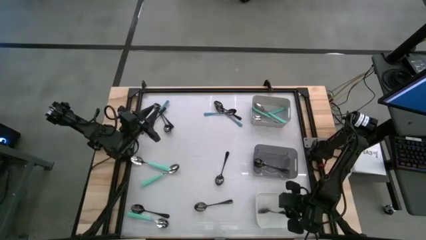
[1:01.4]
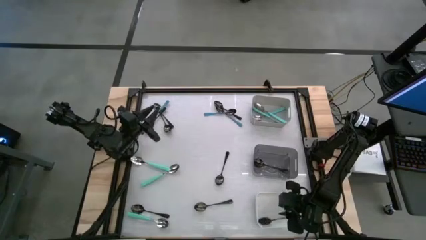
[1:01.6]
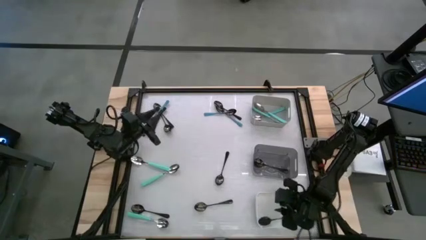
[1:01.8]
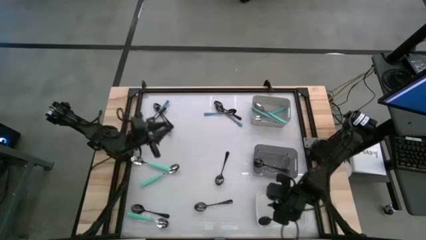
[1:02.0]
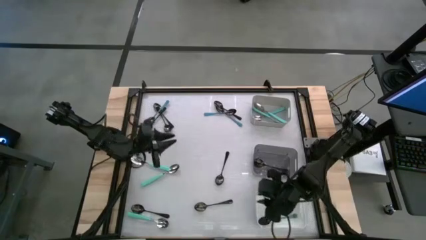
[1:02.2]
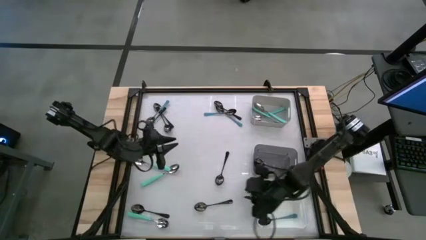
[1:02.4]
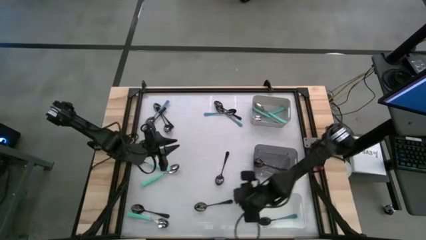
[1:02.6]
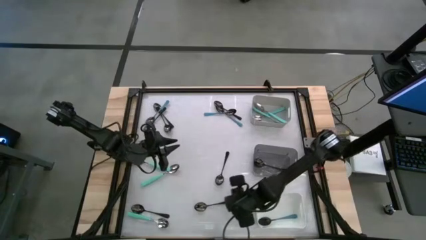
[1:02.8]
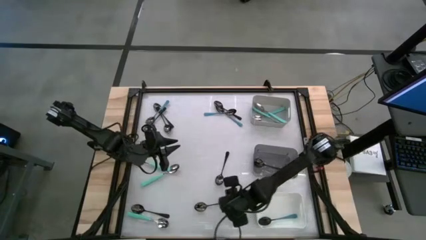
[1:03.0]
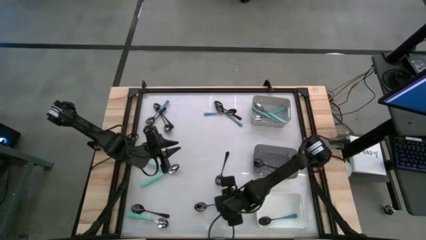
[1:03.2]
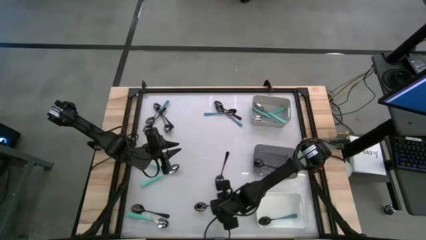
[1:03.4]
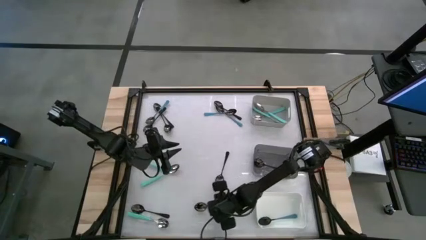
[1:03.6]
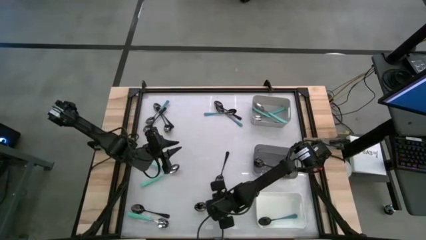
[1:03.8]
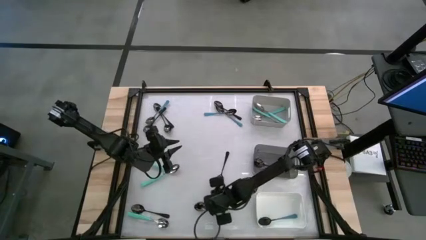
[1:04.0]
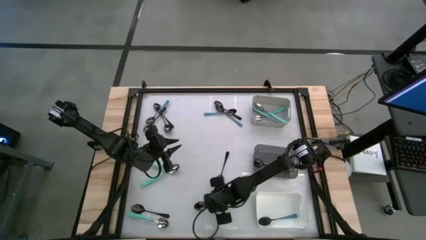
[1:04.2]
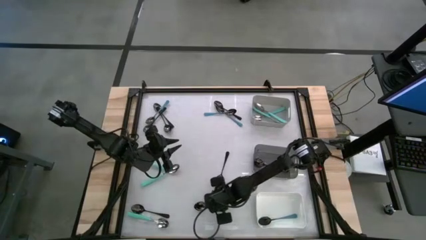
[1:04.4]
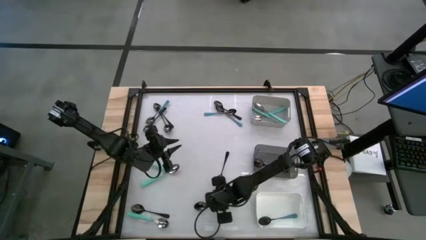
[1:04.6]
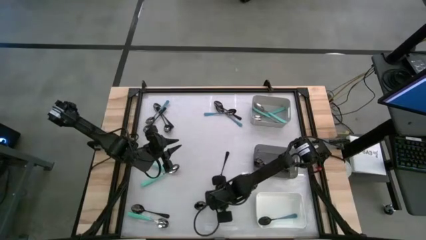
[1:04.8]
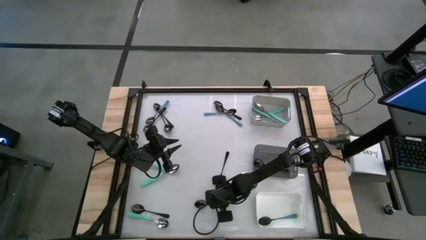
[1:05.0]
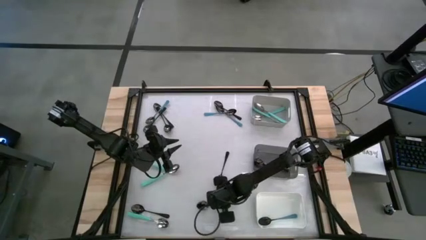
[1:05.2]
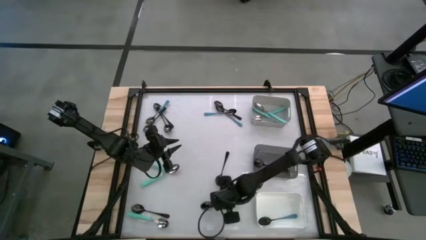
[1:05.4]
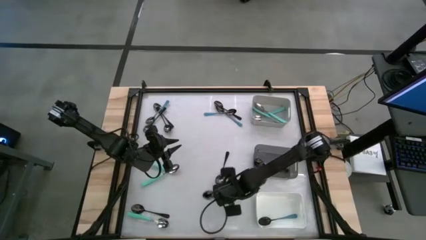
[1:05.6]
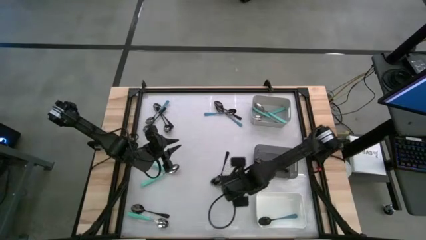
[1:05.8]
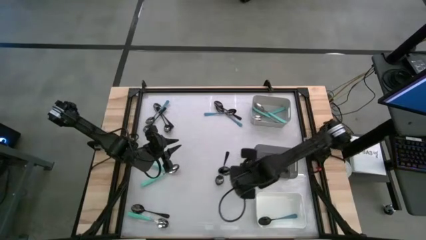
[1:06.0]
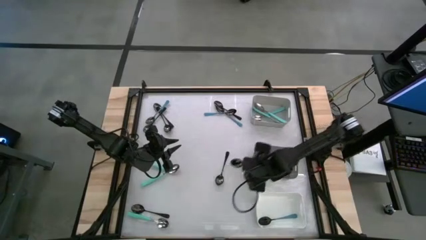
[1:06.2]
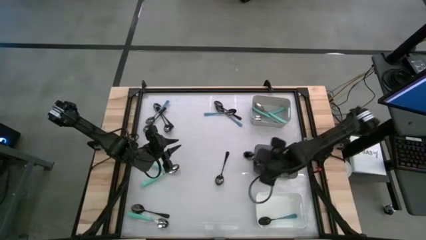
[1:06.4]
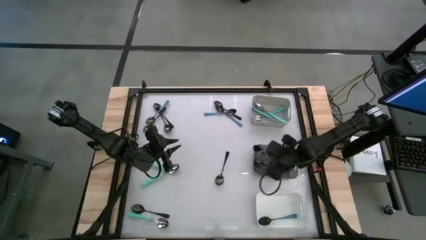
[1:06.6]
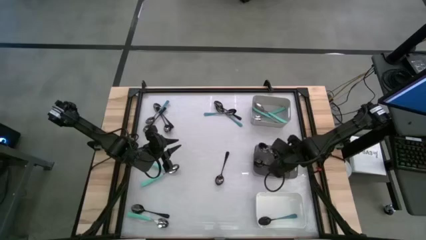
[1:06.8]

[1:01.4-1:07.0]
Task: Sort silverware by color (type)
Put the black spoon into the black bin

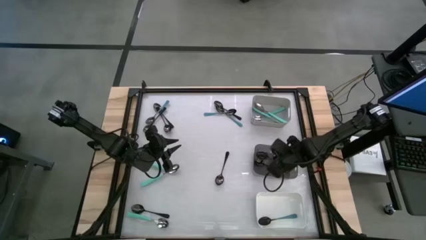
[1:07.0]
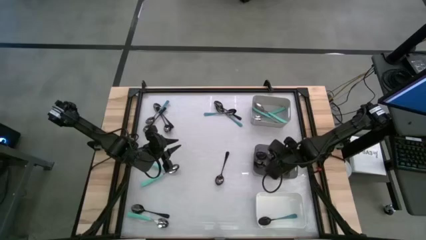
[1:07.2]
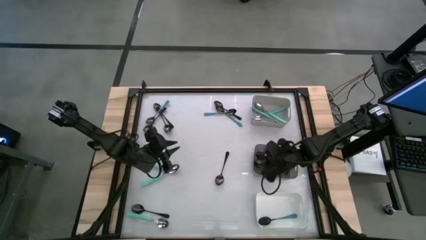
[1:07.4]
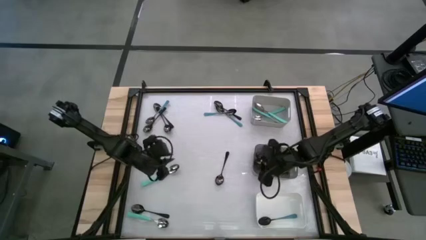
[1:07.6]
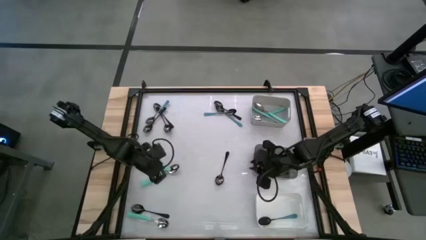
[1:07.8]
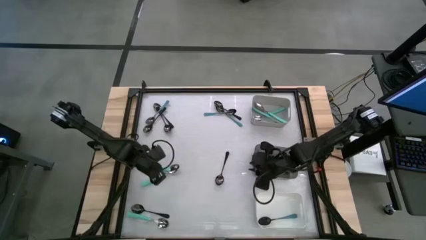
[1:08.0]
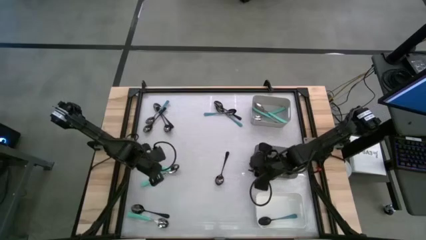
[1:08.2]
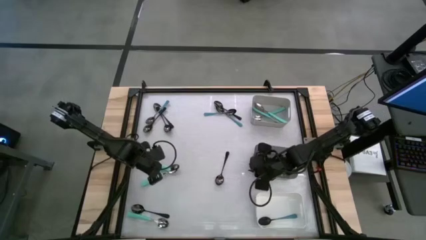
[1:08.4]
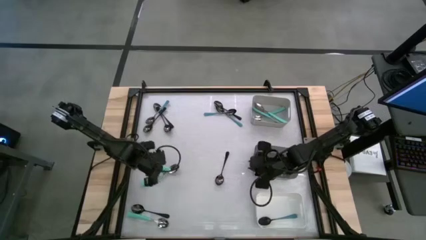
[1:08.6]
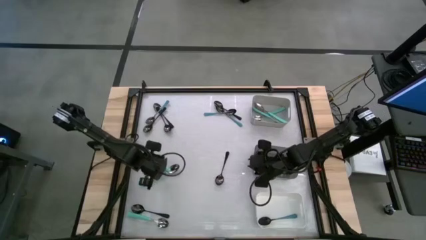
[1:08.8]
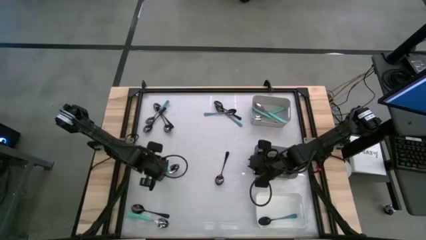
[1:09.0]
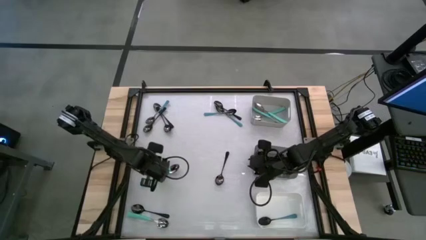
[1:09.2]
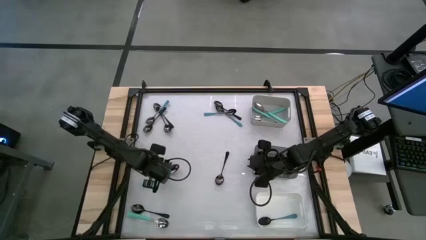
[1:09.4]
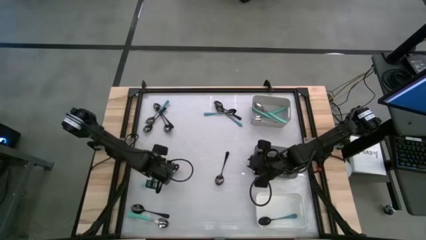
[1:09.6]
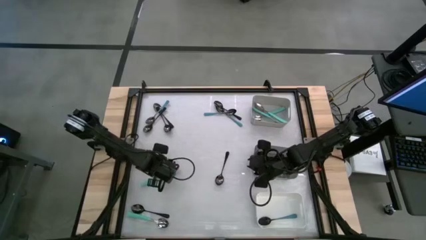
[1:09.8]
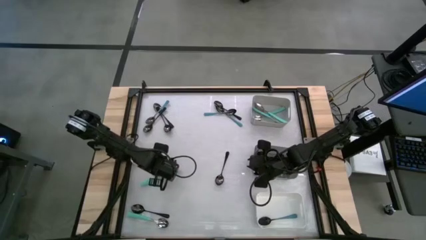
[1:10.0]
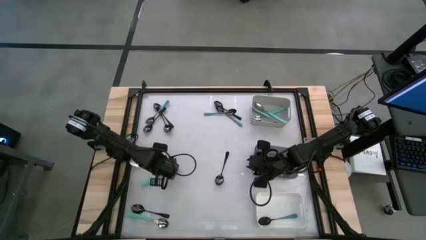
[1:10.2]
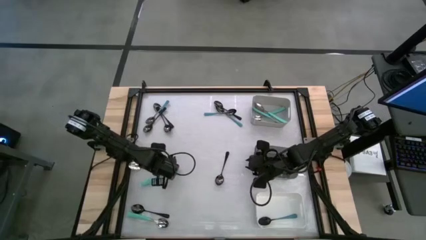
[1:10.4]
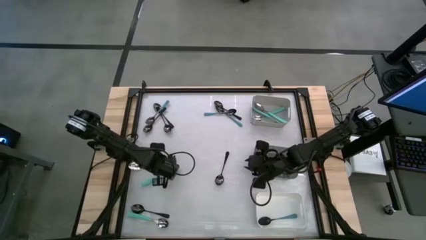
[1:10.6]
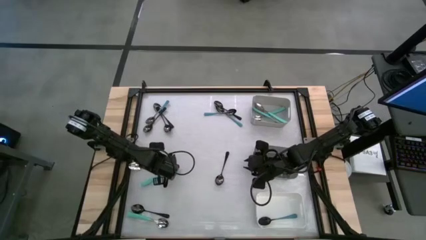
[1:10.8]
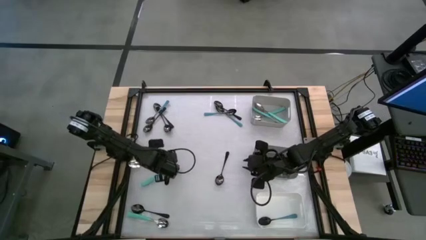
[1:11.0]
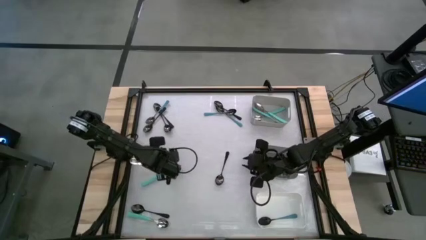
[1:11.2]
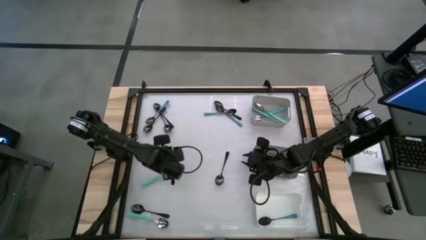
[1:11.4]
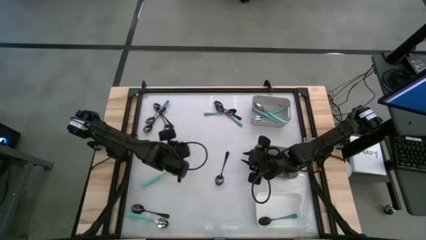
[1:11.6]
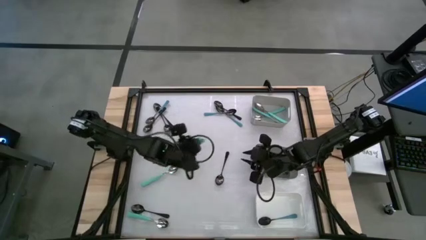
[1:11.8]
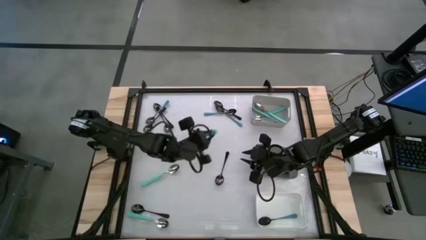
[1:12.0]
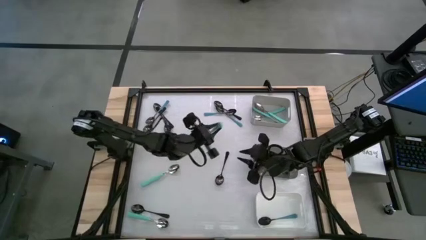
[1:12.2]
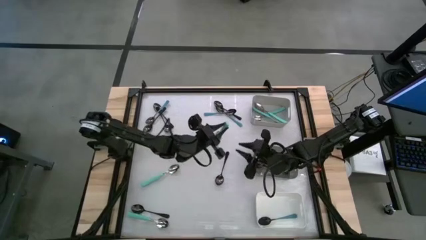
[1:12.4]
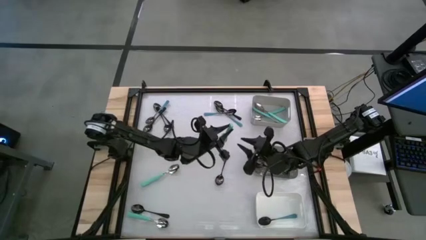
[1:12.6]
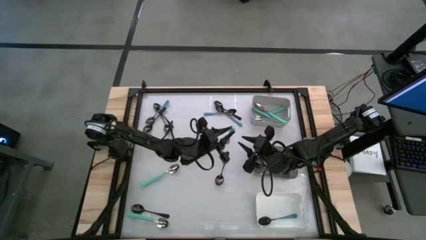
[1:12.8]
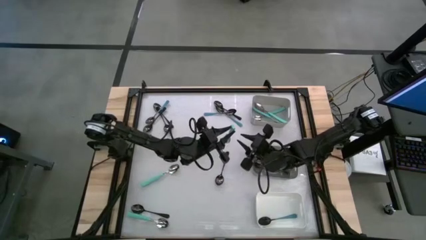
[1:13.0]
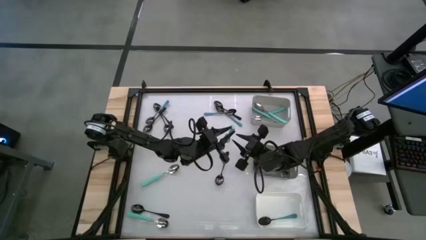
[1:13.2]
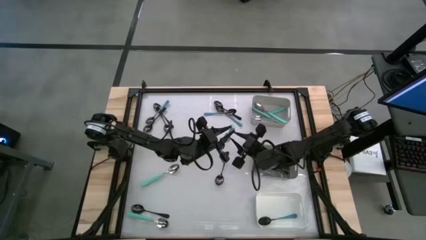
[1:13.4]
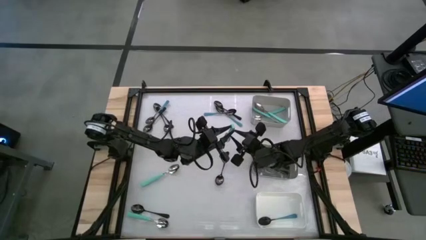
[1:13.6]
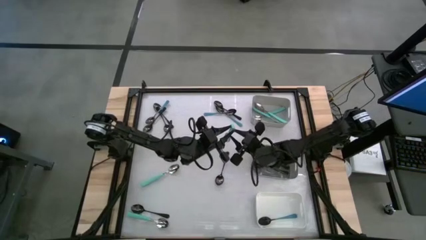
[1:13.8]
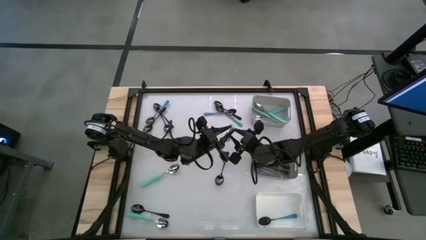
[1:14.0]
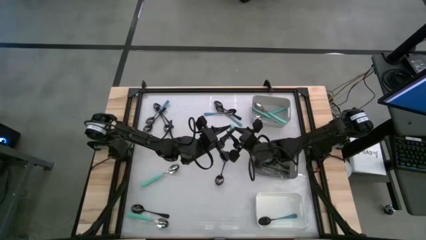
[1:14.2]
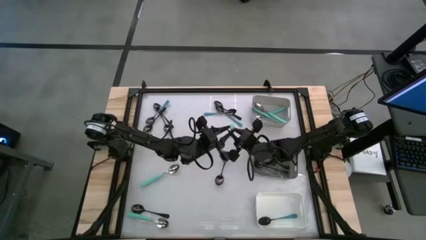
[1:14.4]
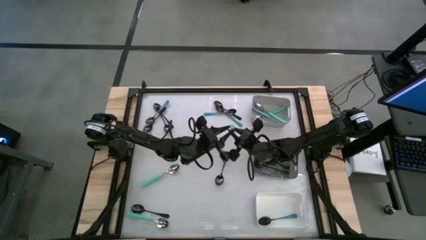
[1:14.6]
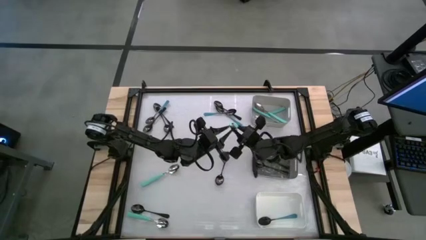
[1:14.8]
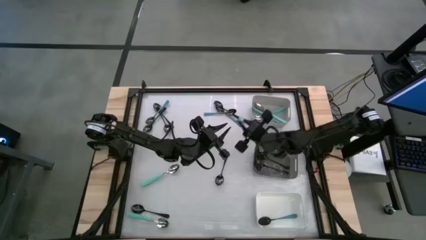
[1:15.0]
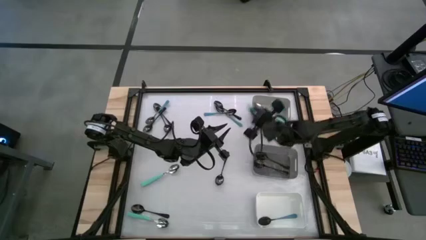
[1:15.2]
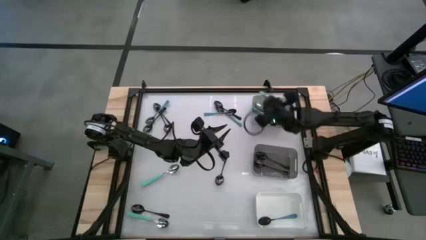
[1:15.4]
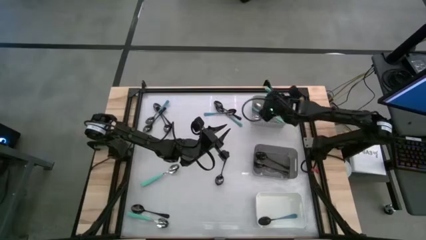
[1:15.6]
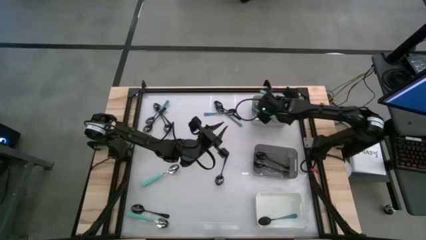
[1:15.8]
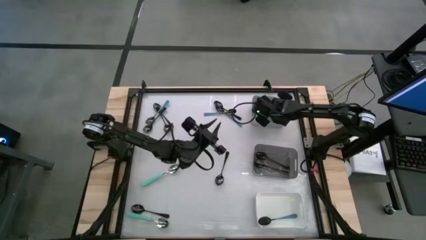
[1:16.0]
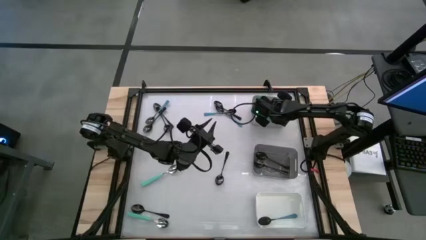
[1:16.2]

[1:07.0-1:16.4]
Put the light blue spoon into the gray bin

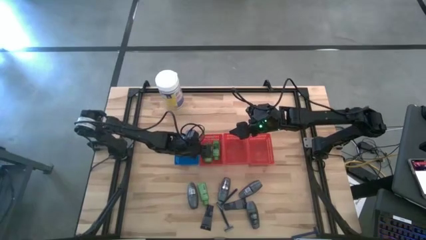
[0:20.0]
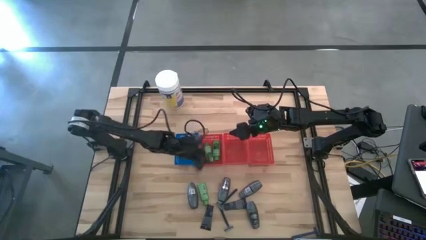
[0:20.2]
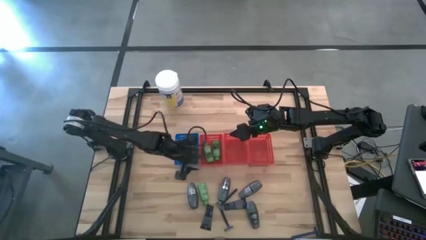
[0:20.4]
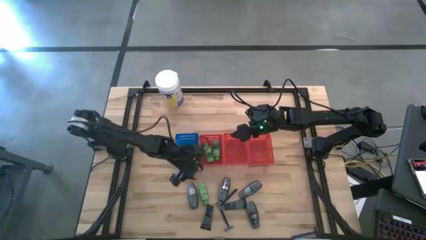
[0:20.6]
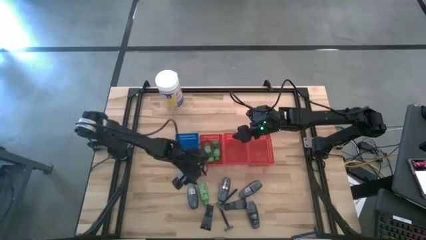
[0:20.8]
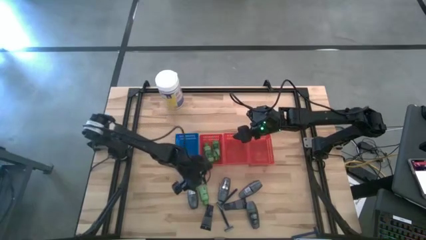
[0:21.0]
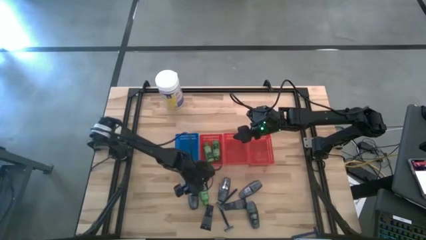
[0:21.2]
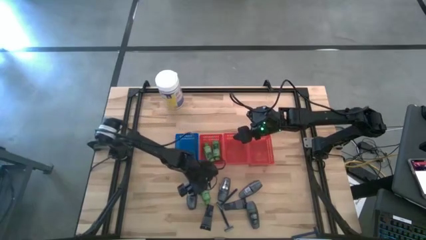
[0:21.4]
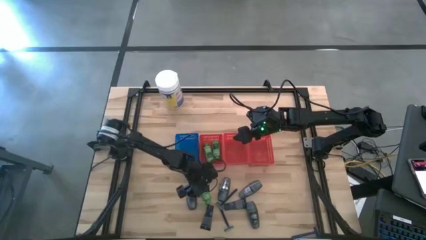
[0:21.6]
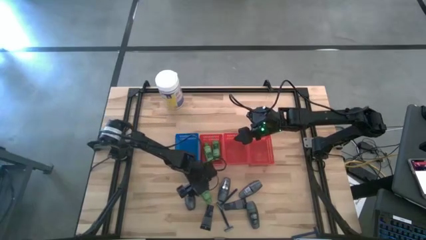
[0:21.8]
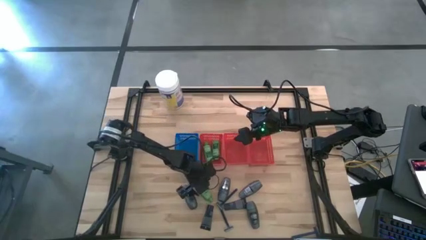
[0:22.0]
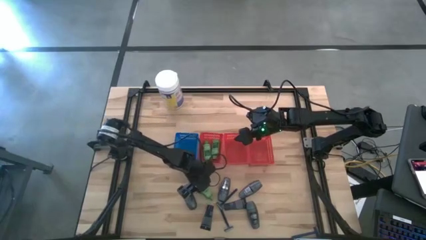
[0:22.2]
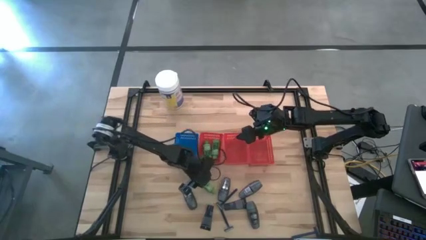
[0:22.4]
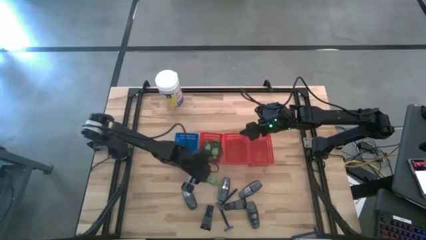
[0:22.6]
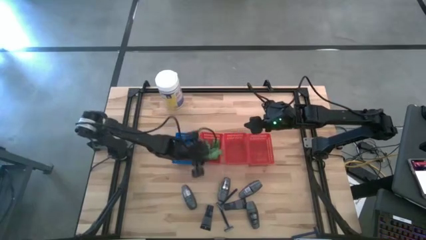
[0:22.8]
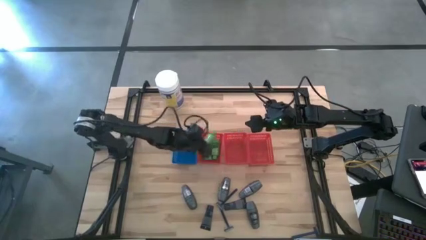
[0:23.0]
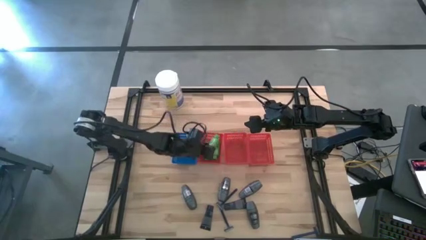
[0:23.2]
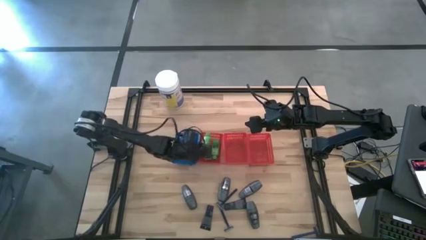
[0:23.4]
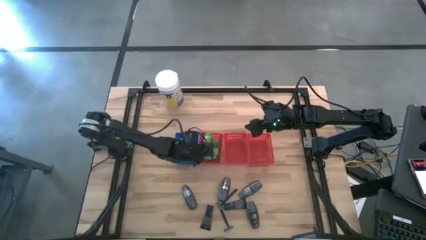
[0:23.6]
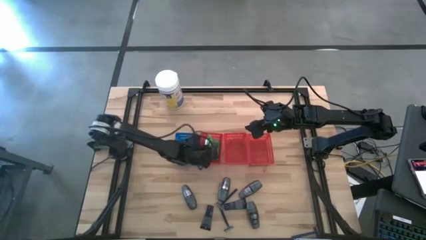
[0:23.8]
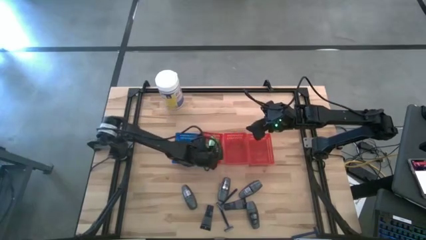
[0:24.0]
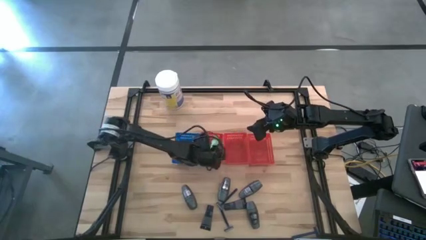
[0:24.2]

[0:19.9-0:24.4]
Task: Pick & Place Travel size toiletries
Put the green shampoo into the left red basket
